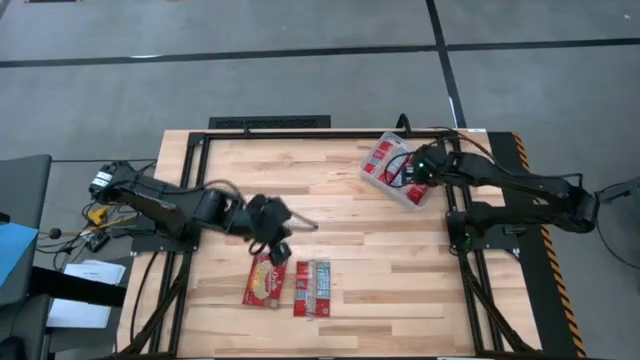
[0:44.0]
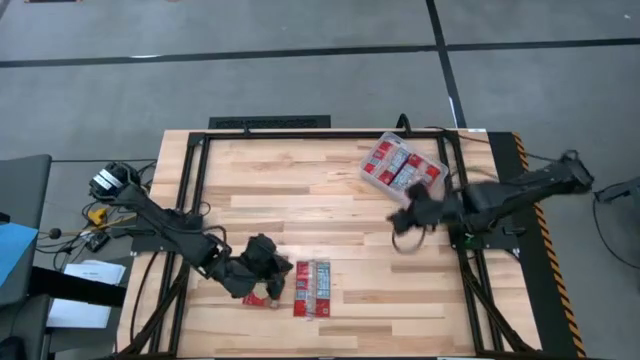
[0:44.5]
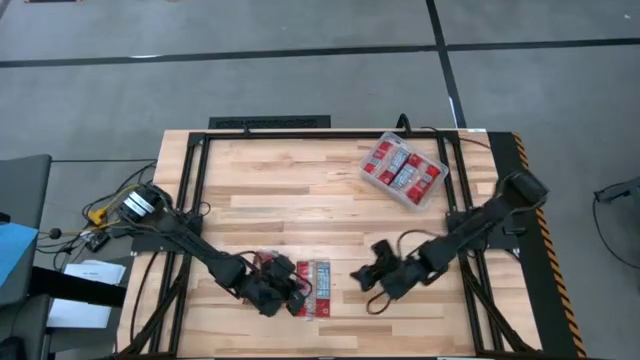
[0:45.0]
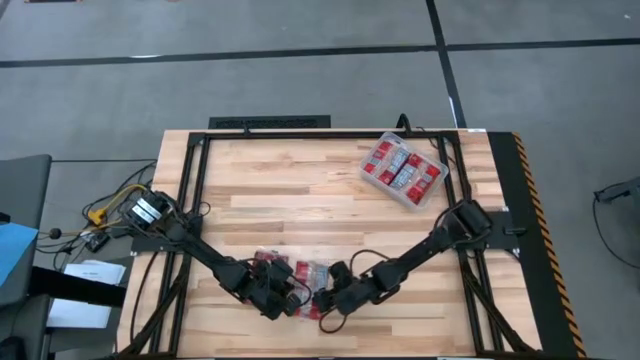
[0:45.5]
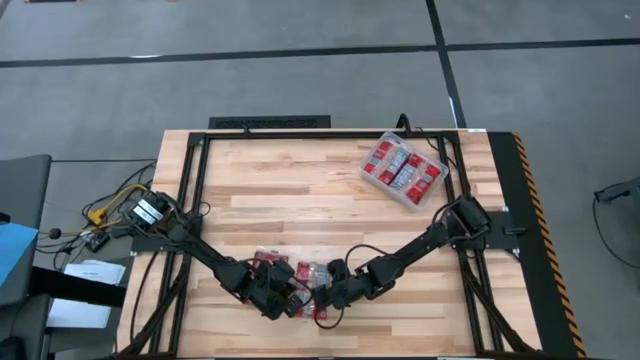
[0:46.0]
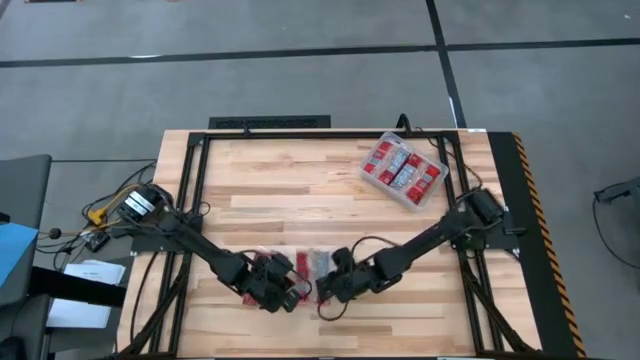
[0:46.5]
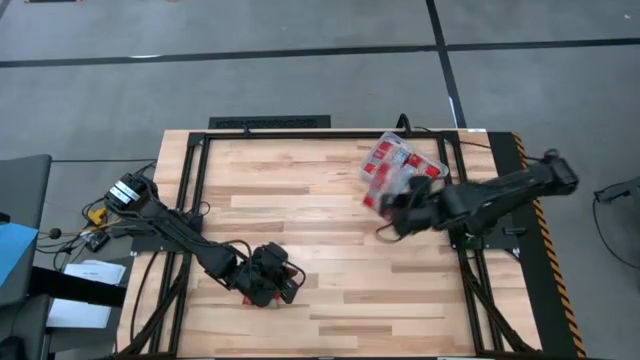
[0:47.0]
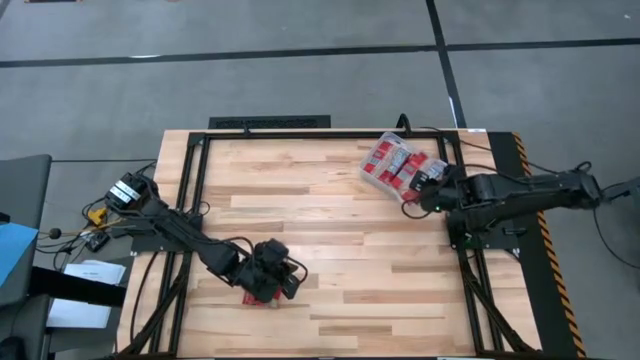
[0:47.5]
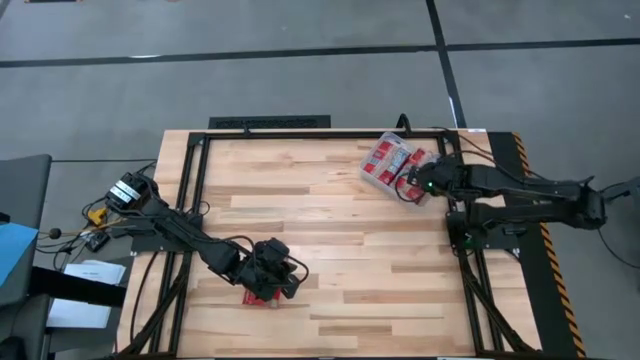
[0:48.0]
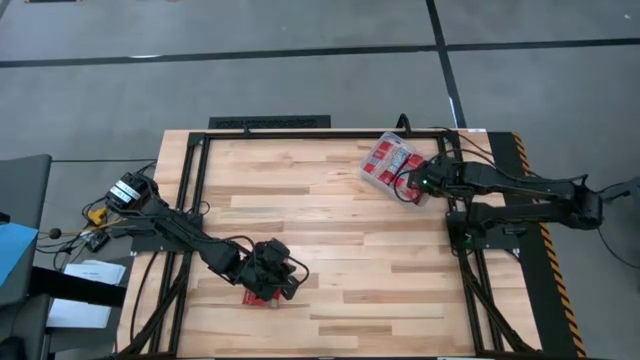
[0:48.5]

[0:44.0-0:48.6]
Task: Sort popcorn bags into baskets
Put the red popcorn bag into the transparent bin

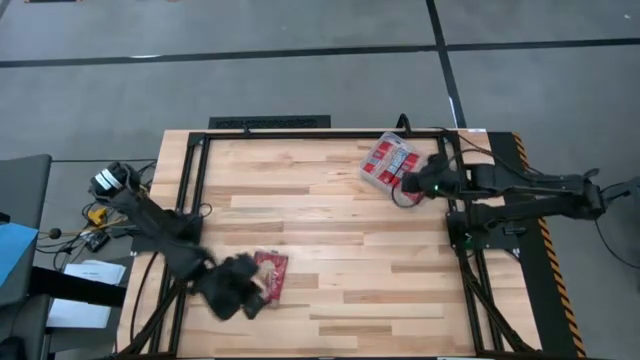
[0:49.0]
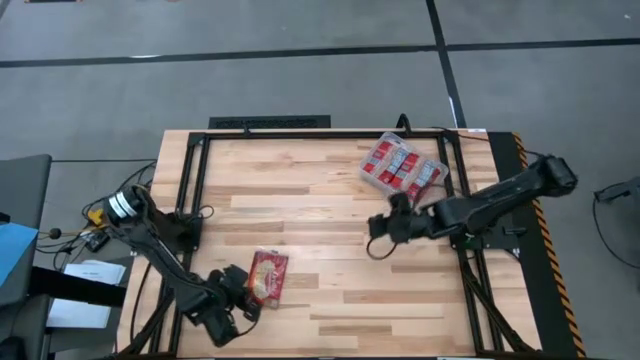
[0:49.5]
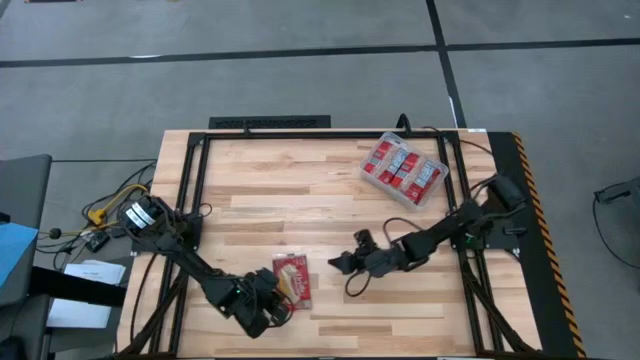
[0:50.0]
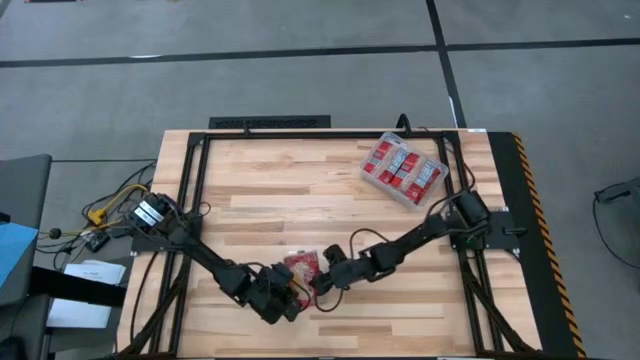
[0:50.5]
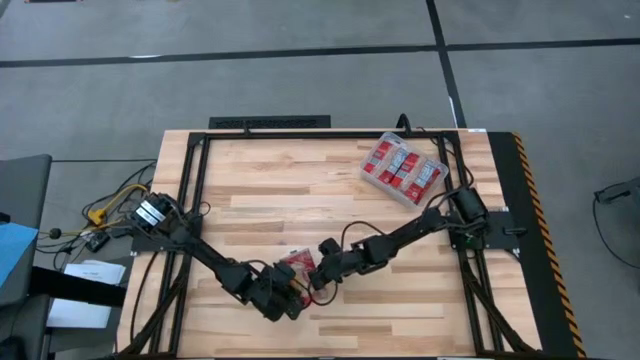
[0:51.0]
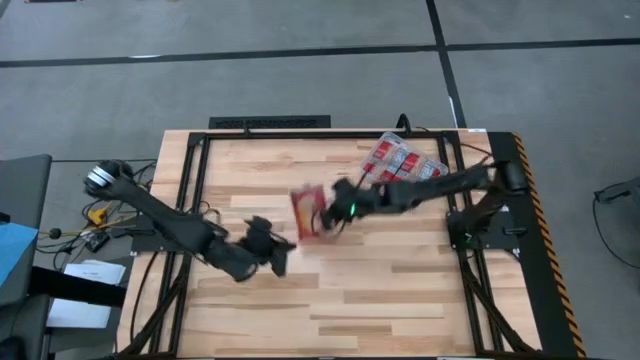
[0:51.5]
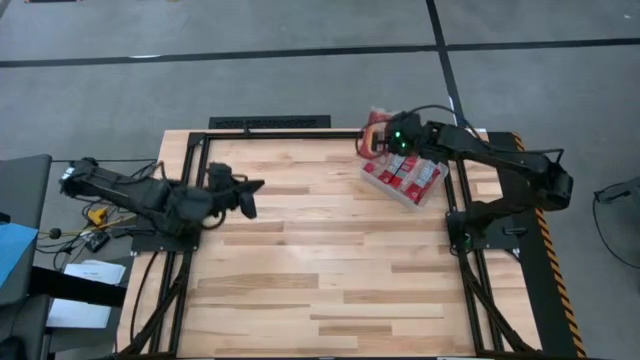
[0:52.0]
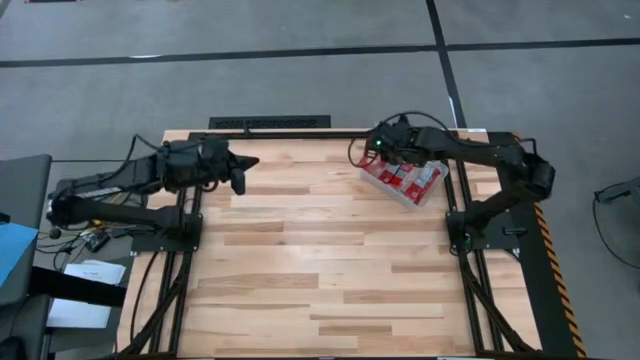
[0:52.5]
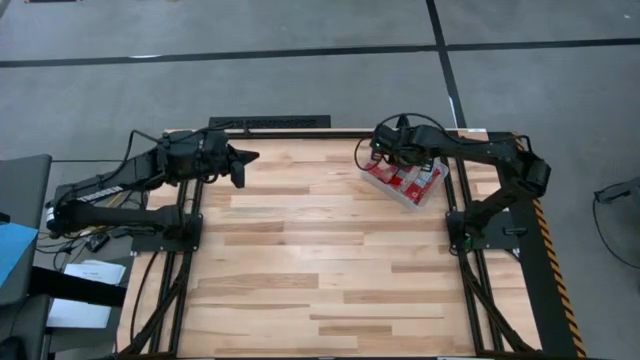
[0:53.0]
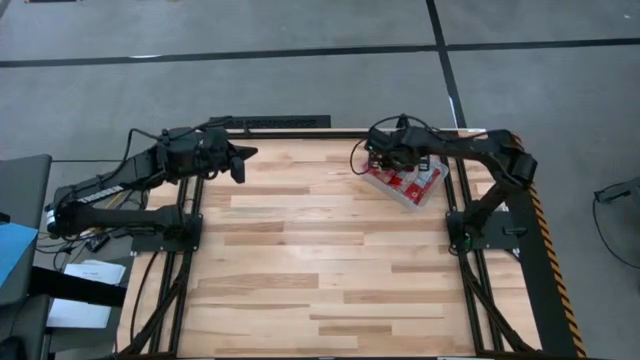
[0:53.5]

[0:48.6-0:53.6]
Put the red popcorn bag into the transparent bin

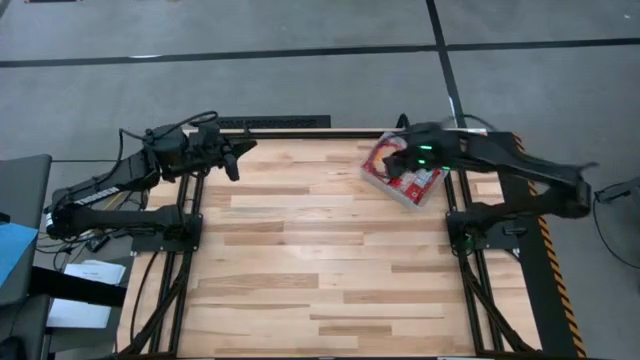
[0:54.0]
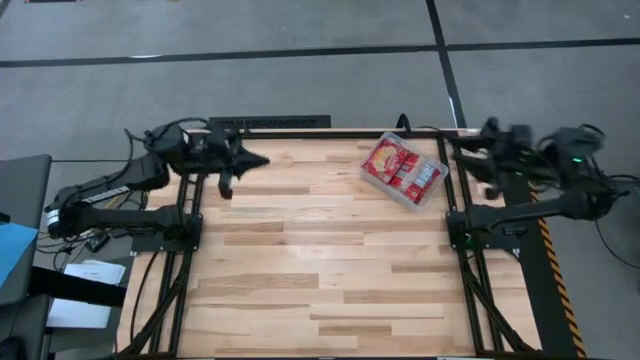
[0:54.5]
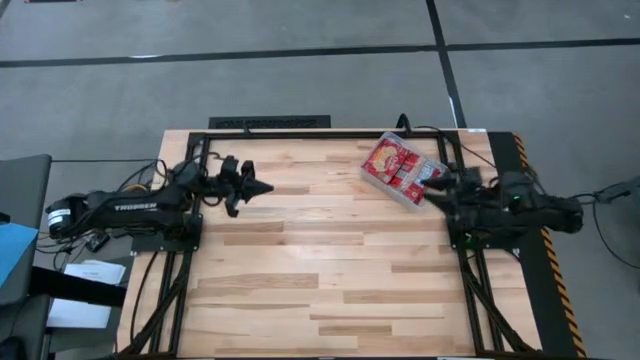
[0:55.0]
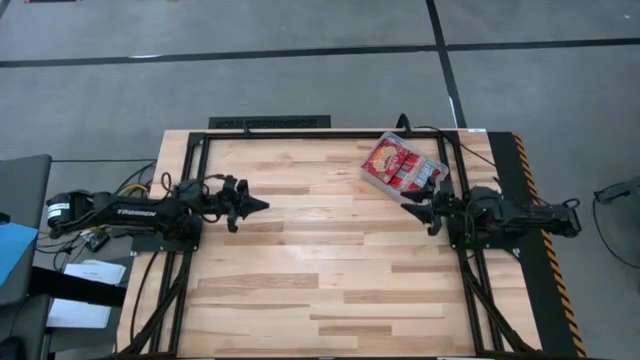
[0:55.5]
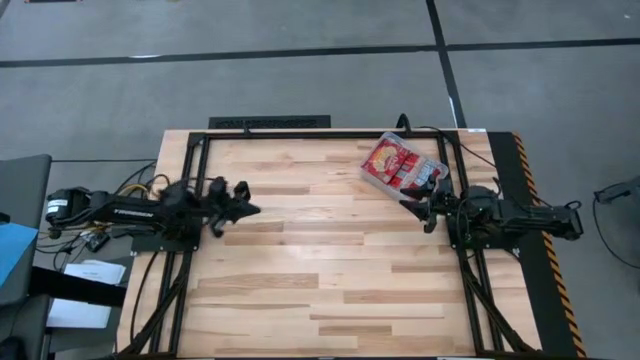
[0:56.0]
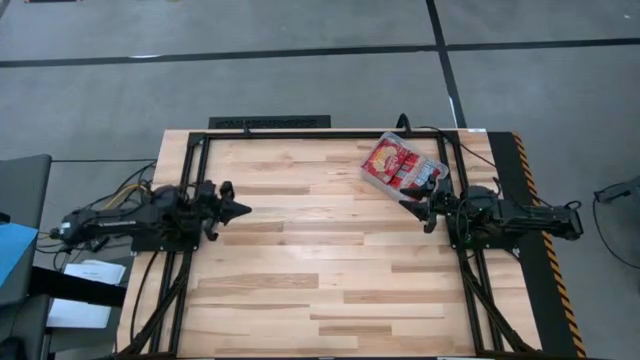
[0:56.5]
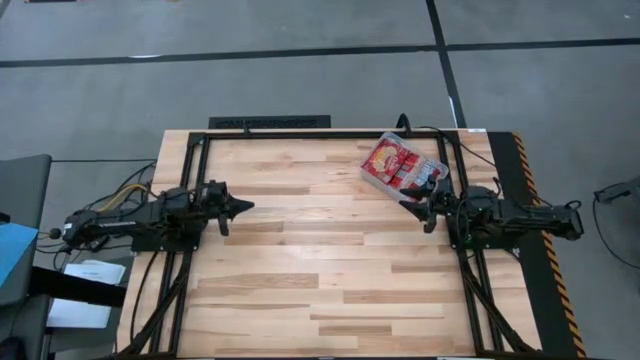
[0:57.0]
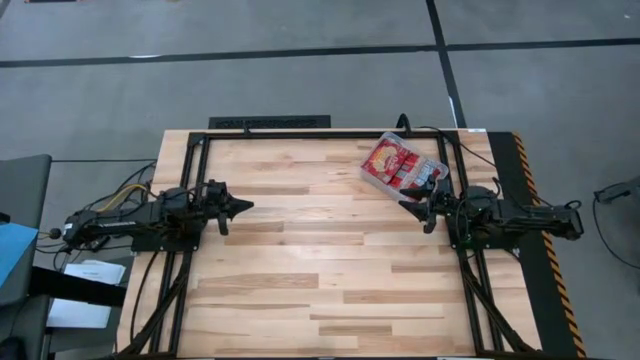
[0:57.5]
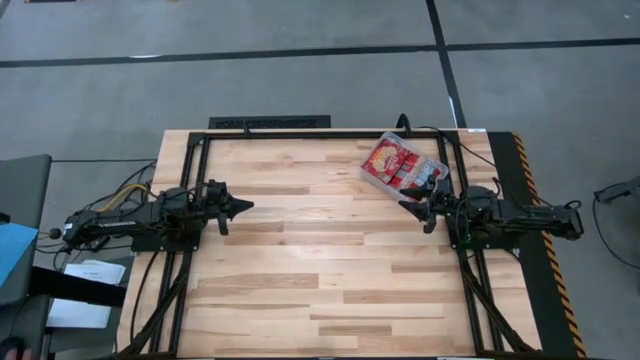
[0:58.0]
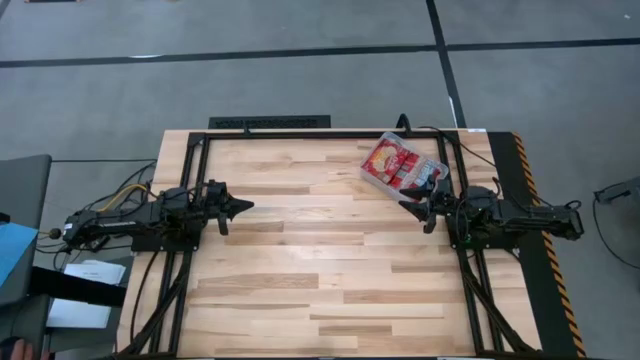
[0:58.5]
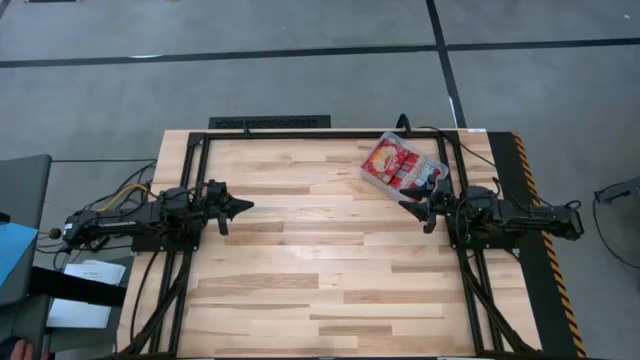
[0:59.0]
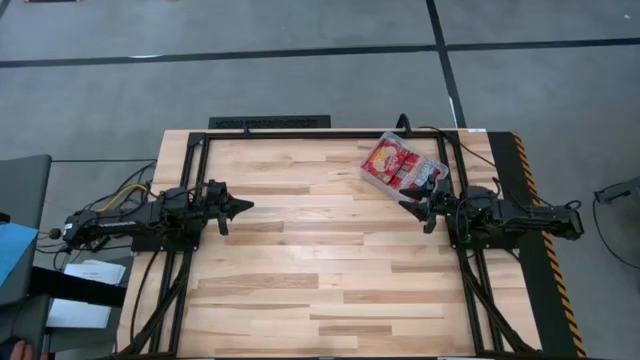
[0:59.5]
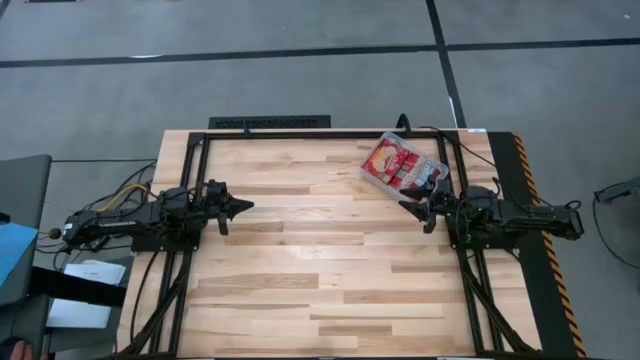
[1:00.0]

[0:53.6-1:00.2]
Return to Home Position

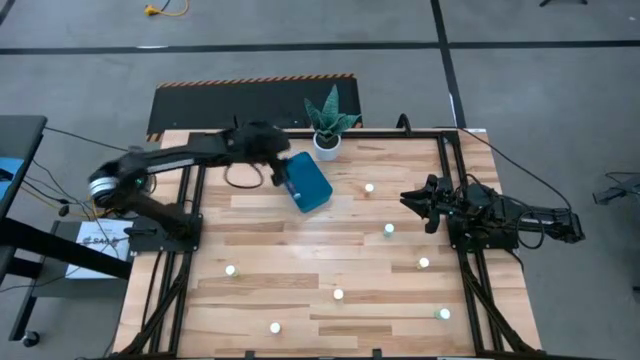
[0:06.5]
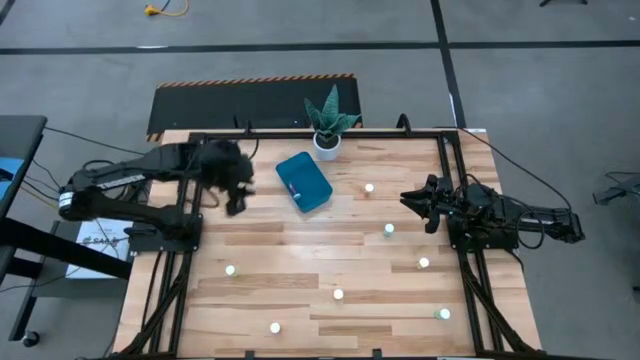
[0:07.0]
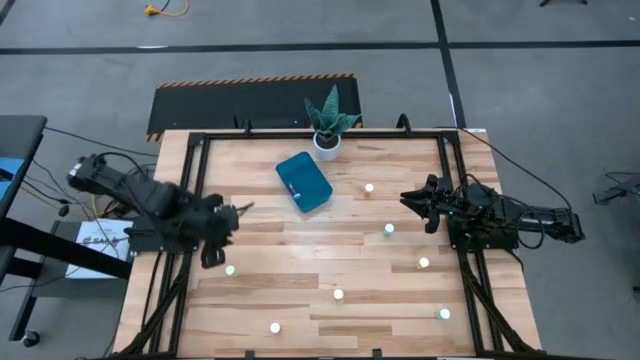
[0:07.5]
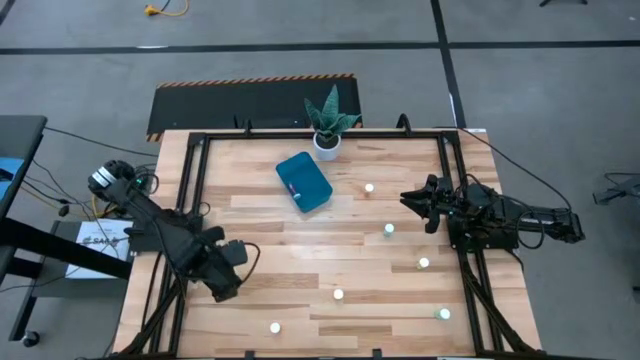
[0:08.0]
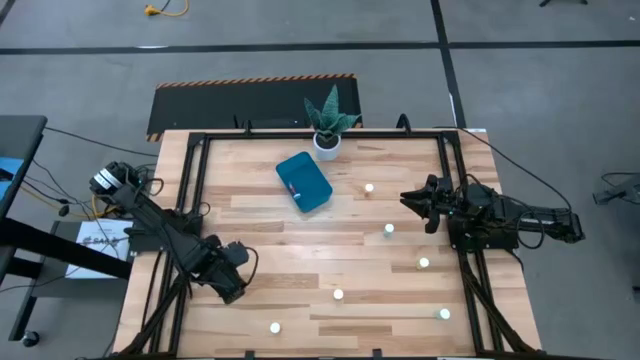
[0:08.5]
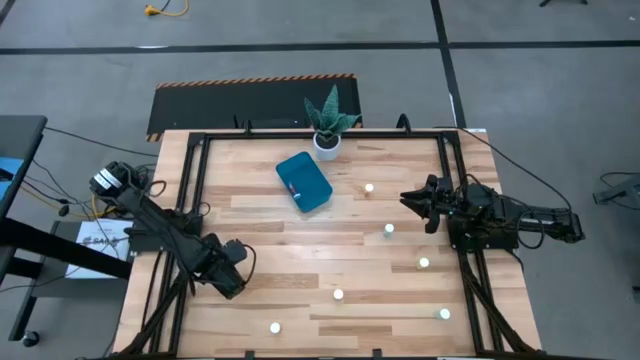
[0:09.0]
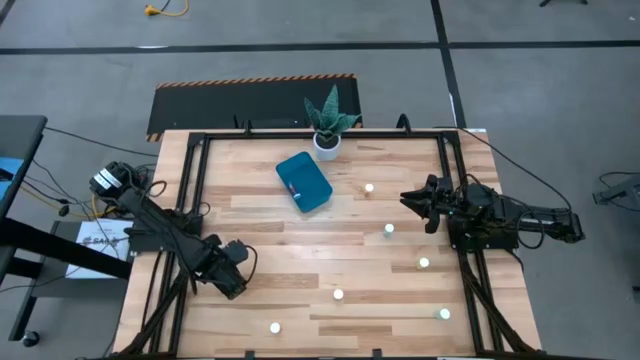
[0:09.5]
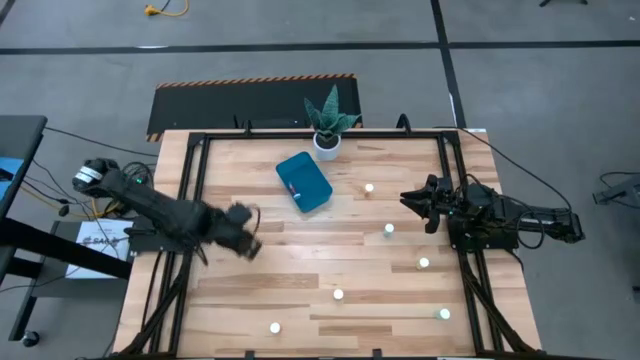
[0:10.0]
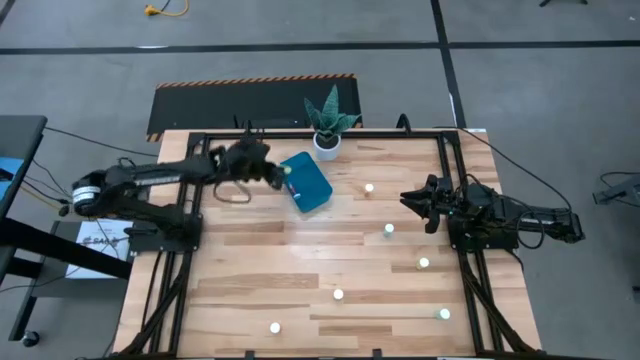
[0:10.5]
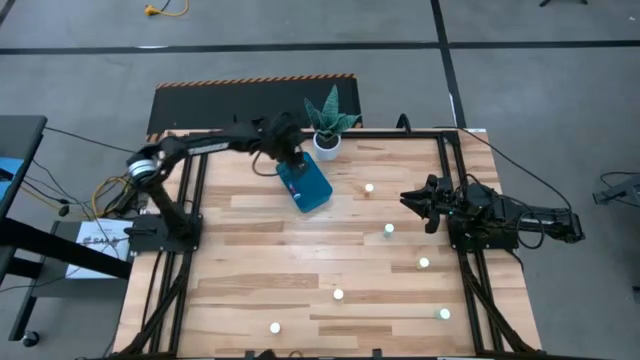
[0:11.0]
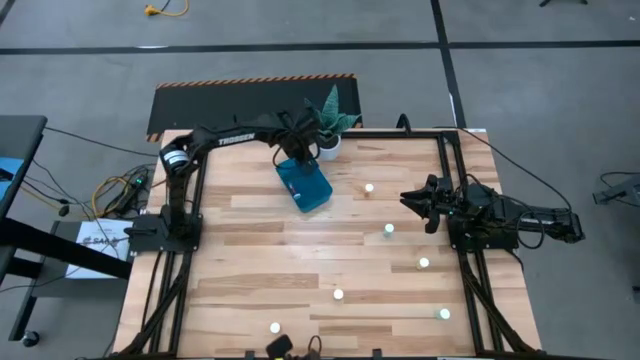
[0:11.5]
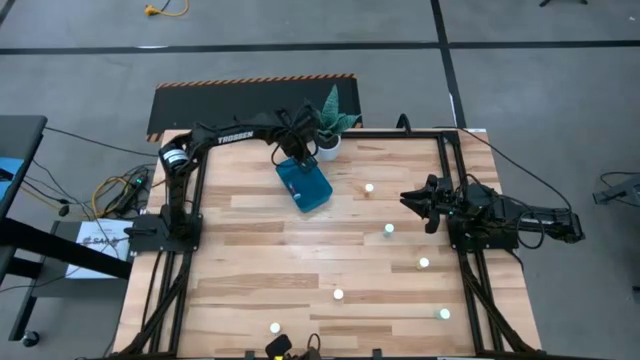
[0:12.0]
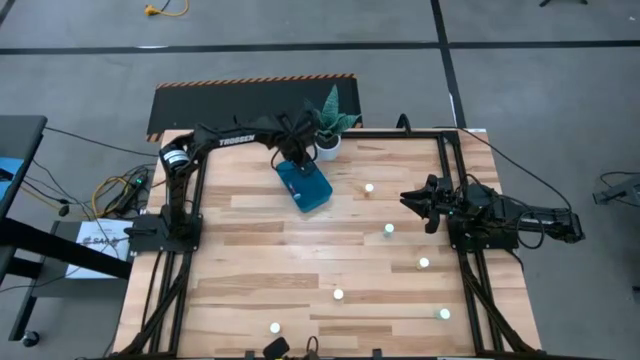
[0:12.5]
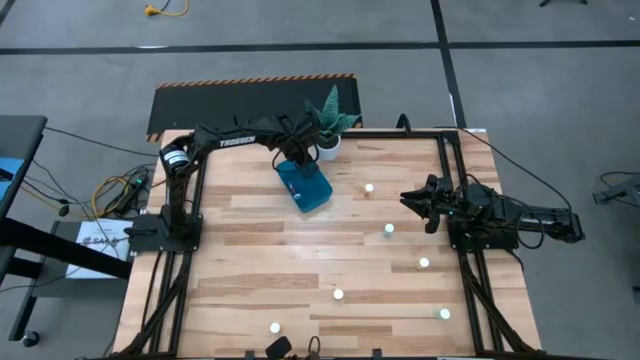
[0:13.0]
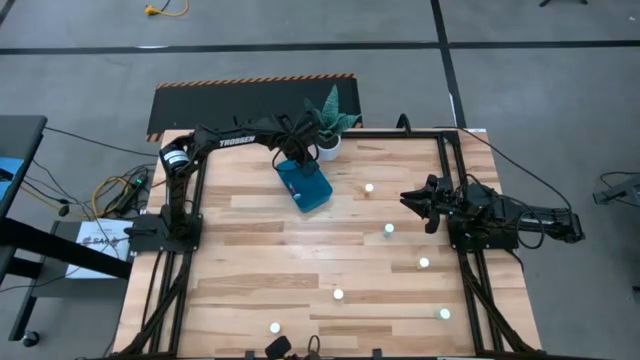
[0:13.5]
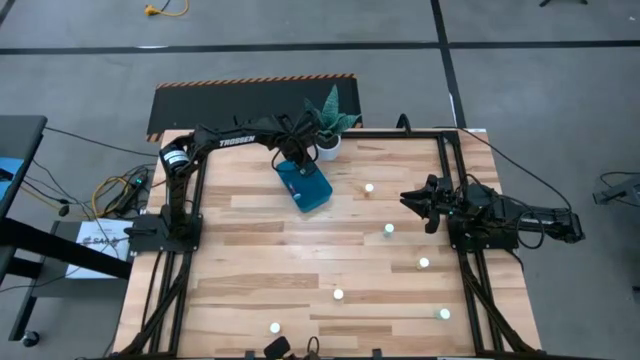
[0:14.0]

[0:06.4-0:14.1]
Task: Pick and place pill bottles into a basket
Put the left yellow pill bottle into the blue bin
